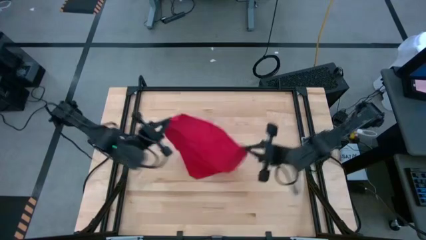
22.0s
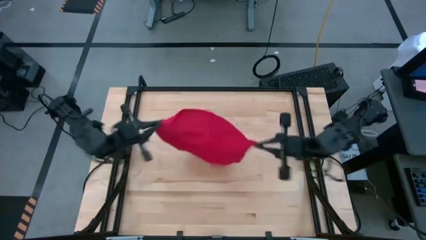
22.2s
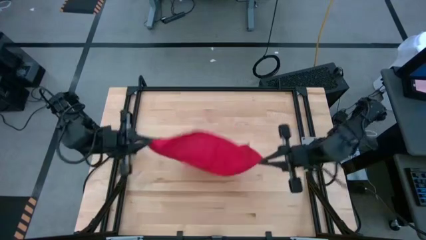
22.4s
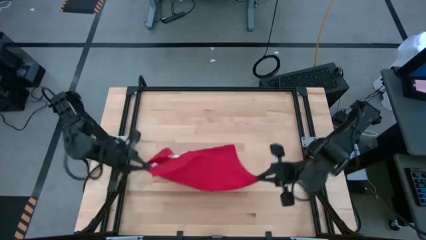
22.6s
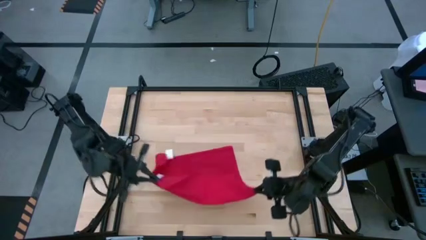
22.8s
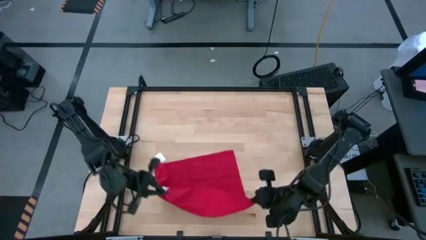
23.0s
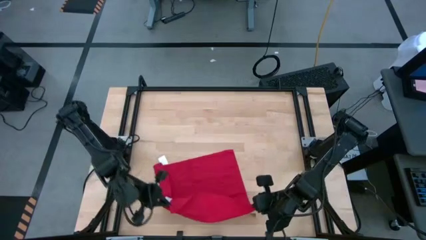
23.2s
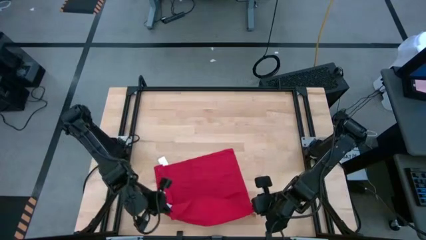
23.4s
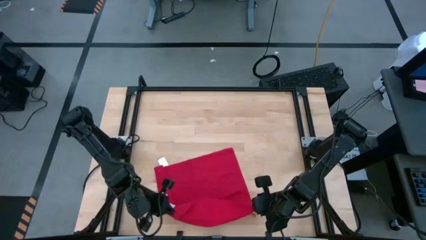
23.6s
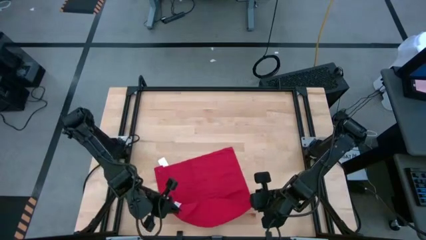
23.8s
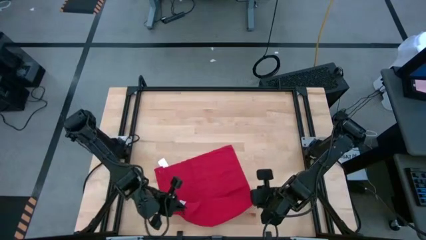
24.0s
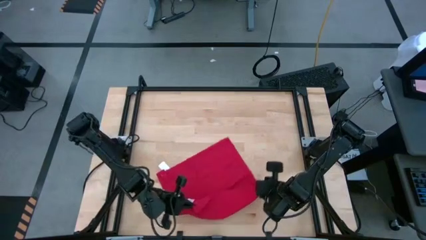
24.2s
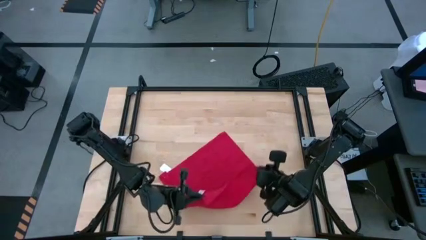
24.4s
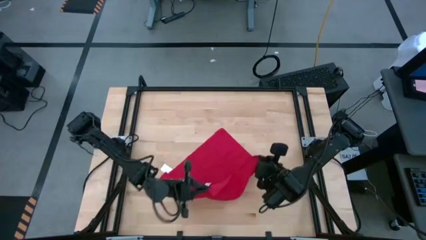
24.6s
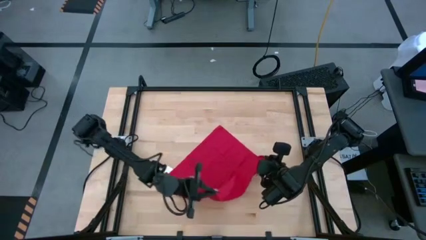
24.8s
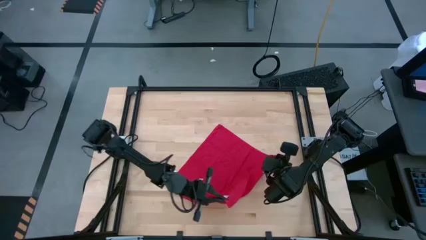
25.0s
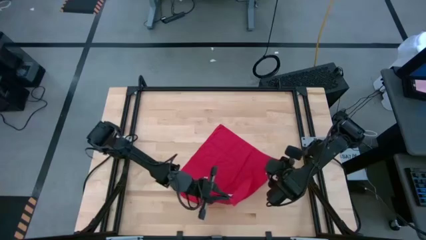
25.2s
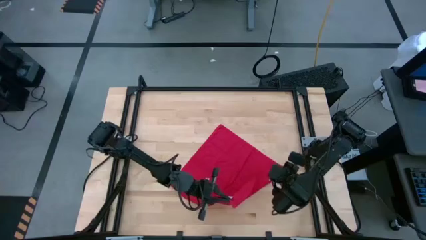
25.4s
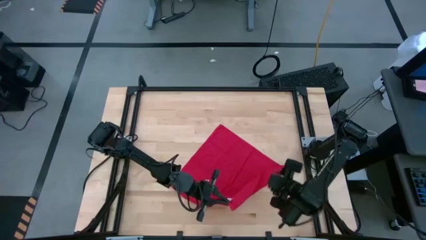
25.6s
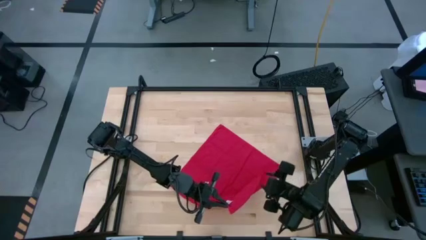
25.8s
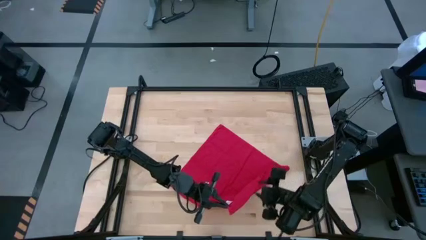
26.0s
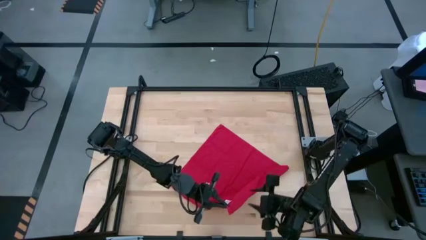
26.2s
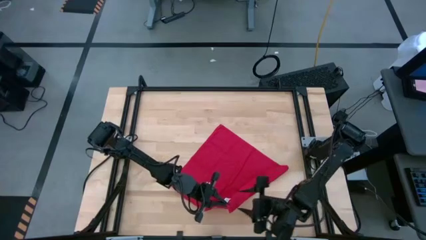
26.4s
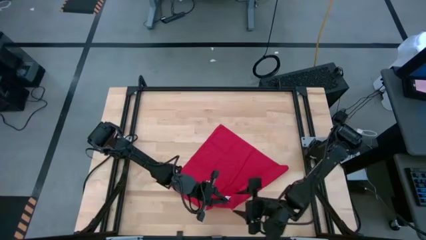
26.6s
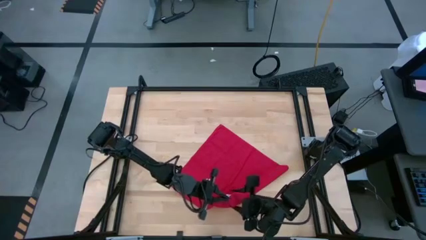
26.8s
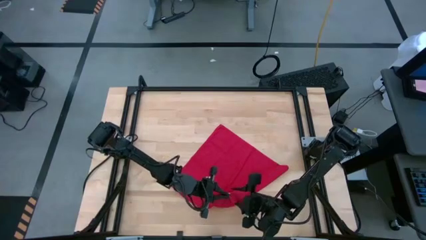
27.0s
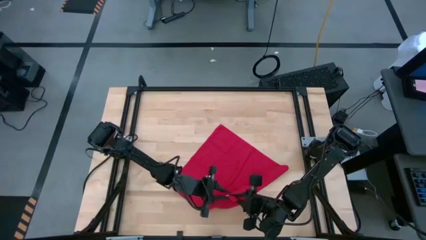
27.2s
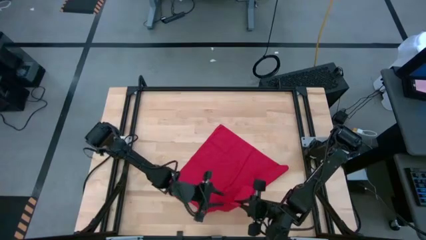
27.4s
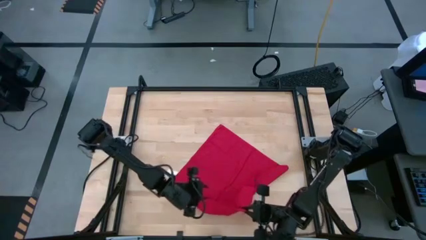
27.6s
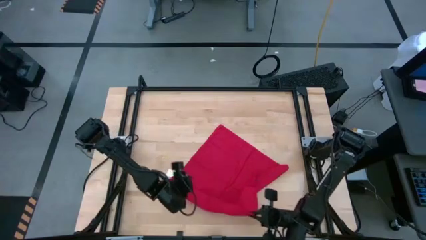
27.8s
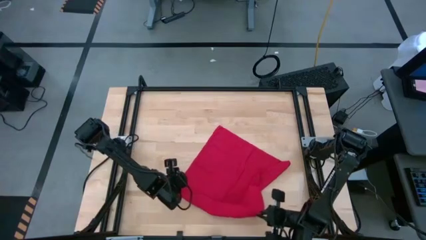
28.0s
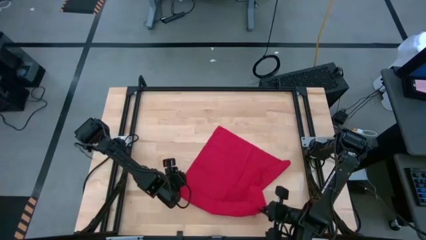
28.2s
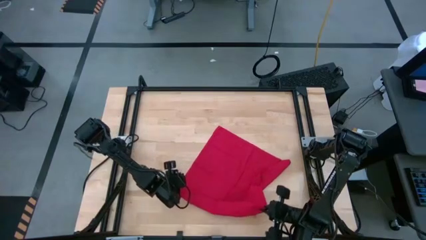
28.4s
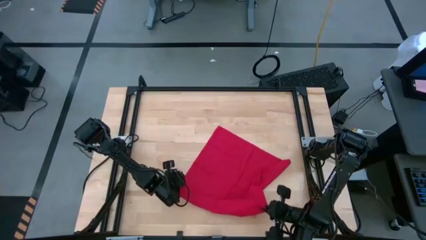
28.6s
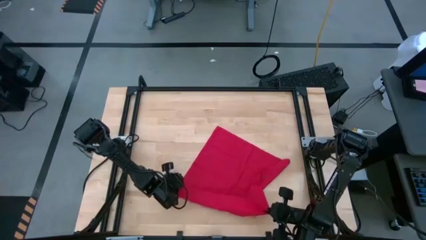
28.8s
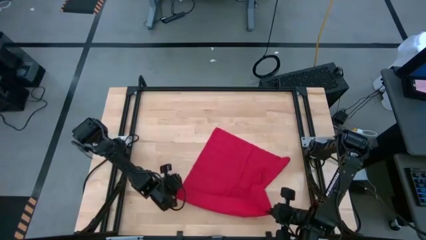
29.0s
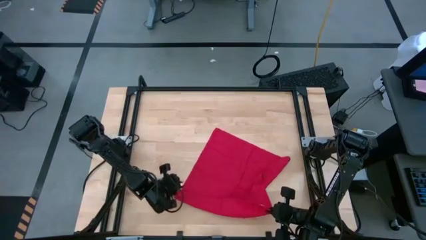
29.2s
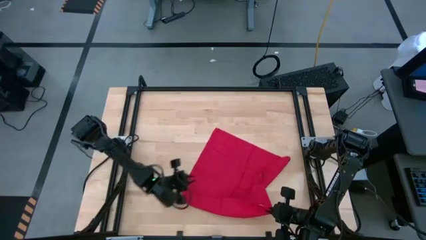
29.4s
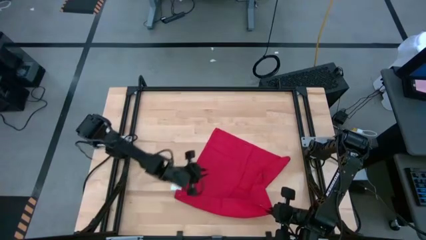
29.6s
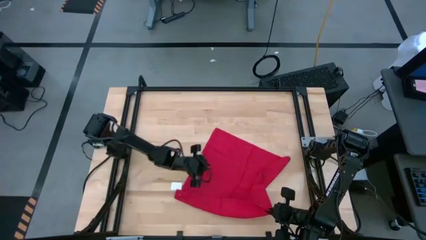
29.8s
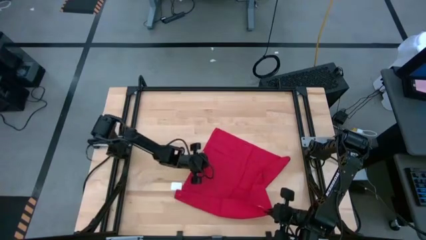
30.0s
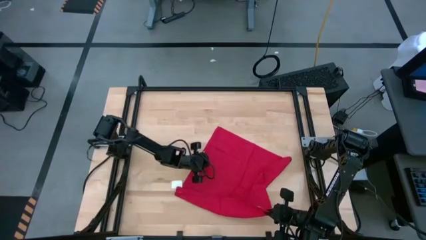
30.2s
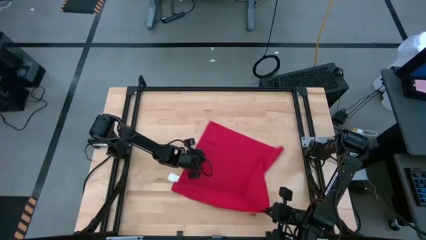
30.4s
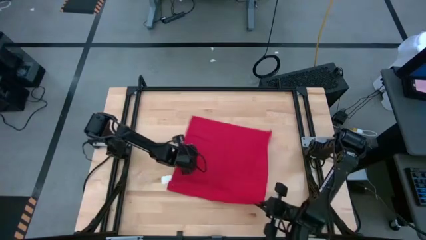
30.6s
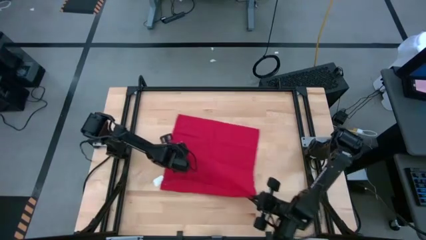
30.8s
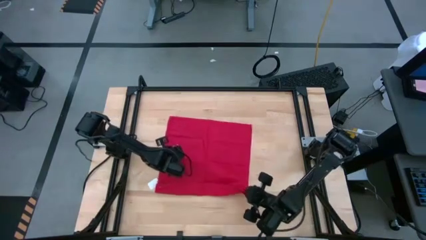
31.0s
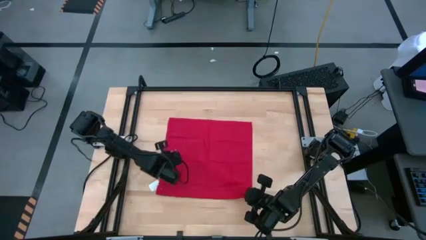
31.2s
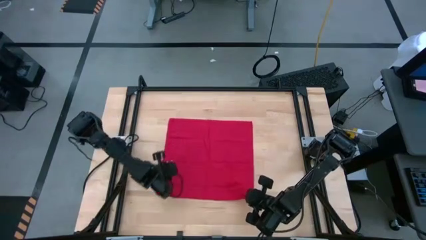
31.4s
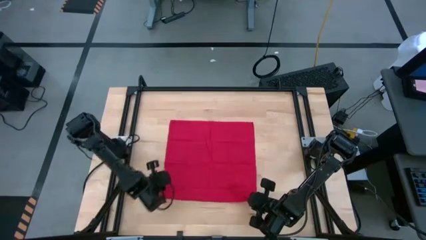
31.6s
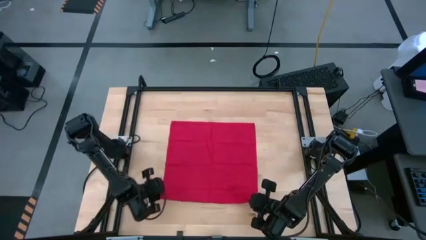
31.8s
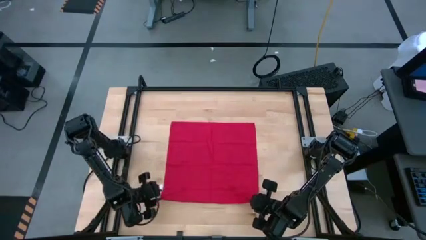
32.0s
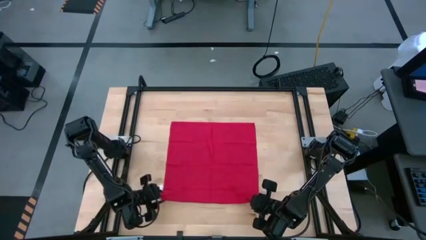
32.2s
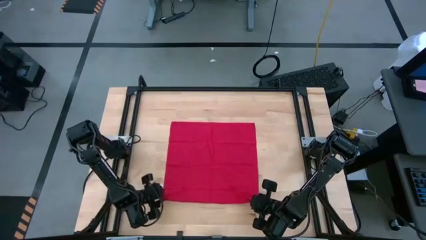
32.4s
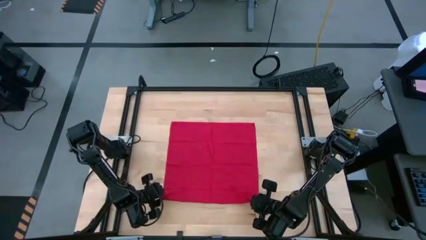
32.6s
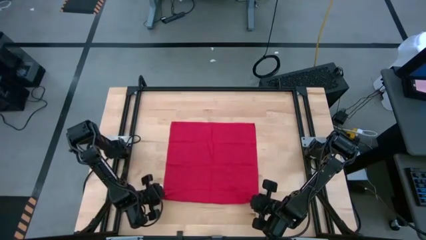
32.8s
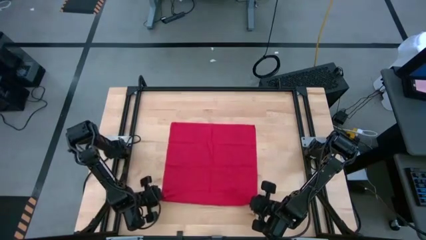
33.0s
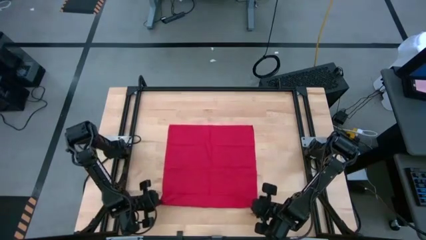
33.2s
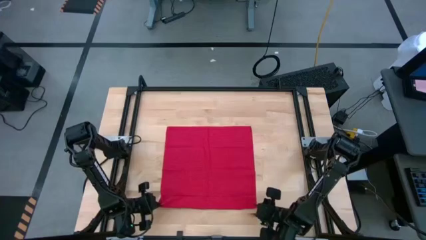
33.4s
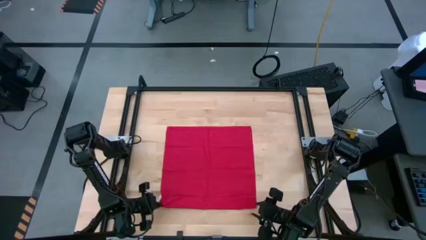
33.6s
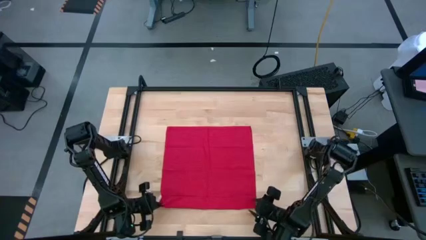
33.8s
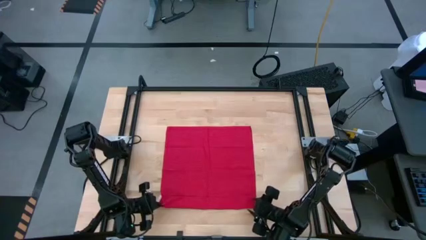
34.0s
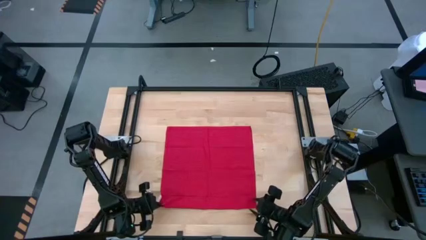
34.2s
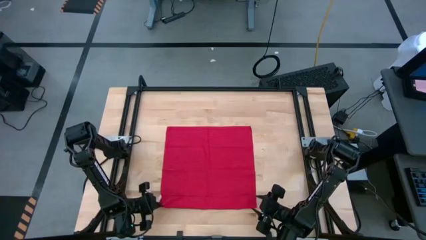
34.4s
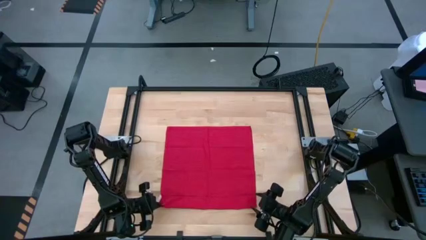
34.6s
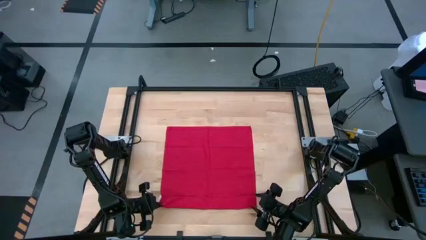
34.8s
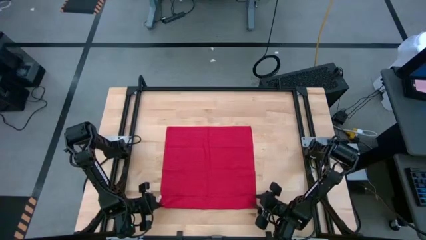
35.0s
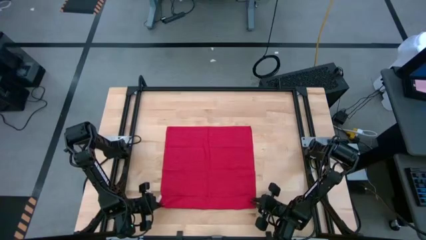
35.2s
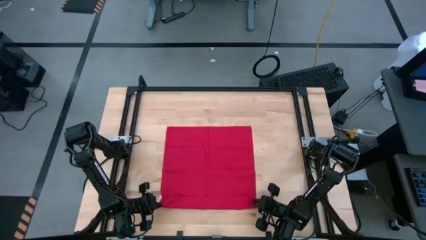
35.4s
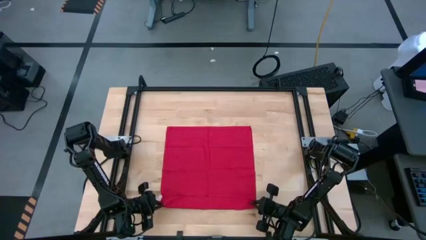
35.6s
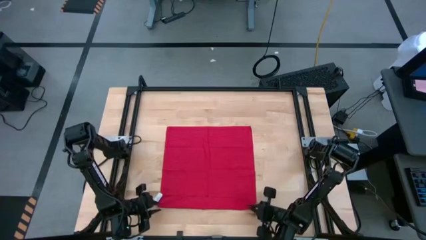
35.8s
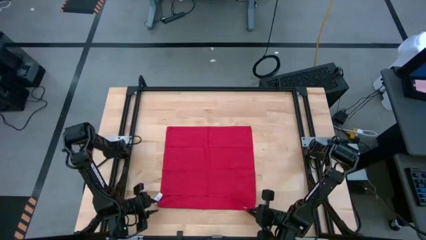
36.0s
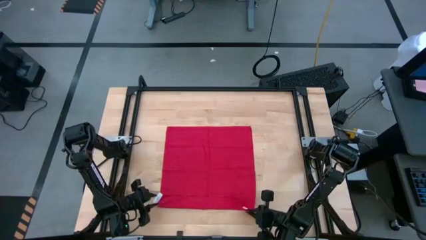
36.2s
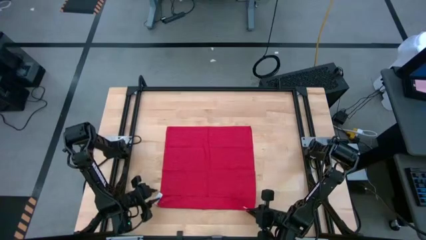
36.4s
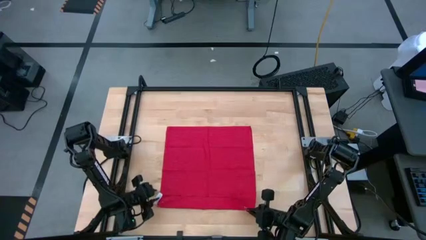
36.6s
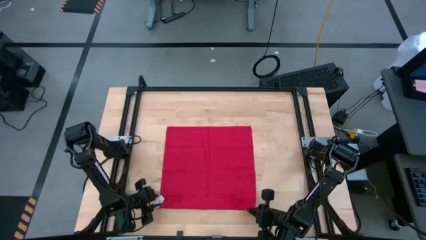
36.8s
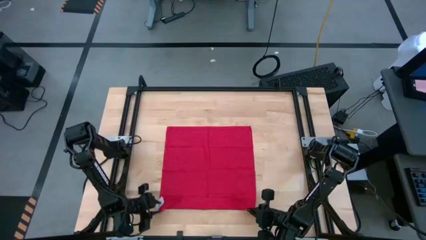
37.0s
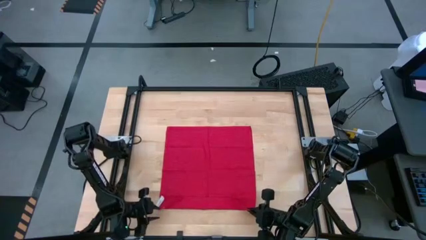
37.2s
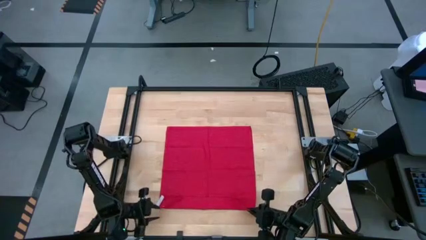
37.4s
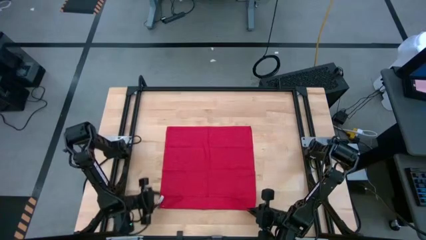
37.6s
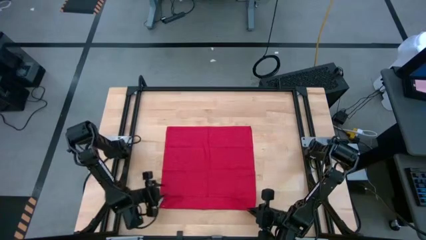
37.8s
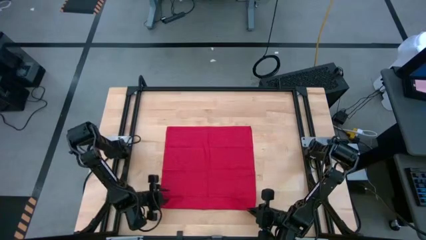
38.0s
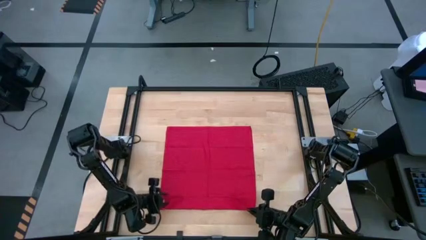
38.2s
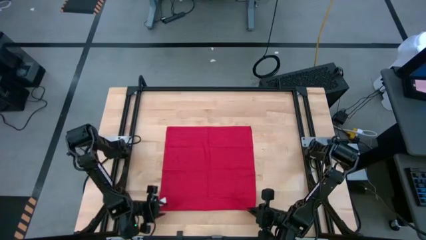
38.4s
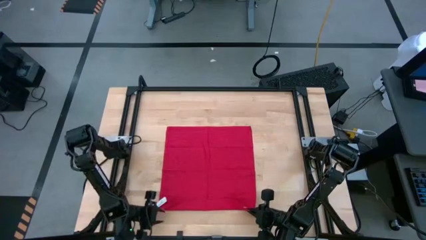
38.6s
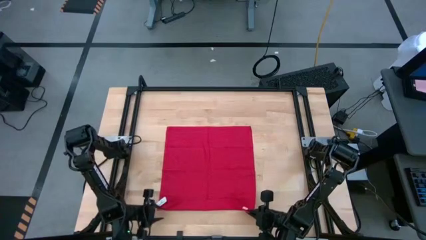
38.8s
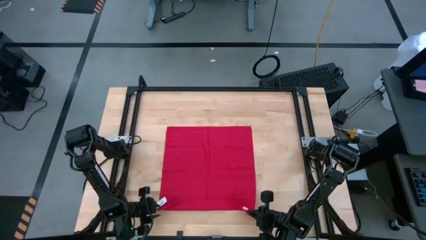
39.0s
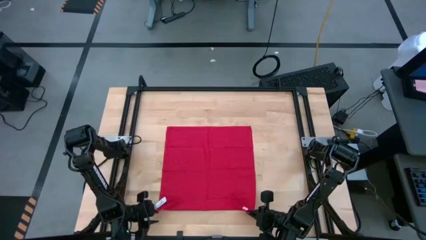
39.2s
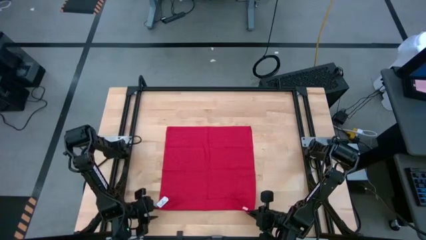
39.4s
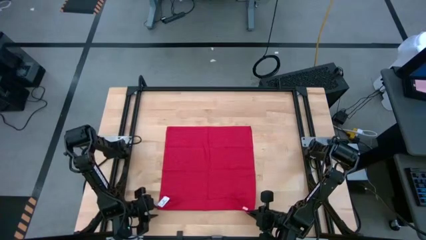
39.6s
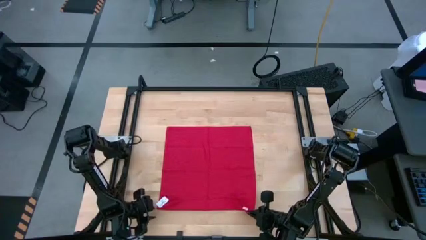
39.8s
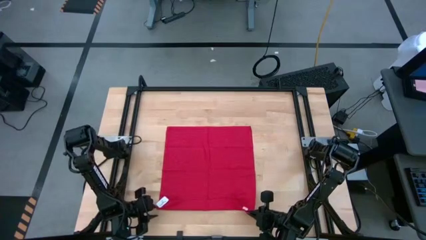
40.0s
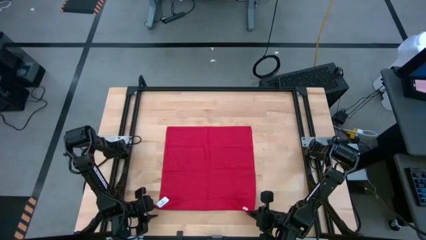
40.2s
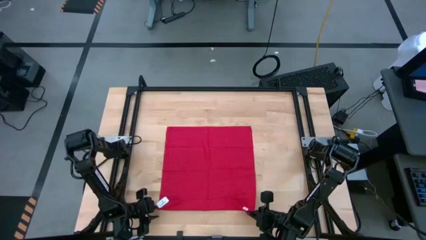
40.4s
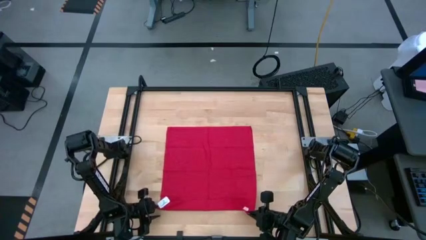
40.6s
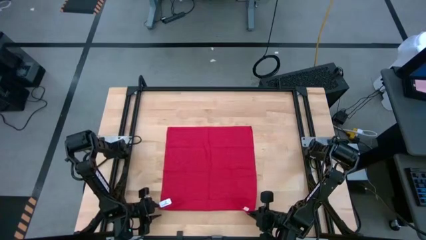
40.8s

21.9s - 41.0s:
Task: Roll towel
Roll the red towel
